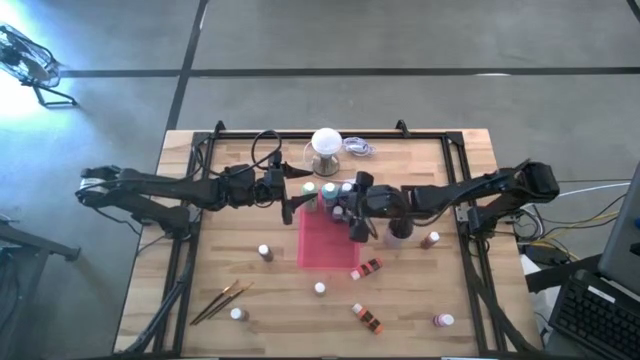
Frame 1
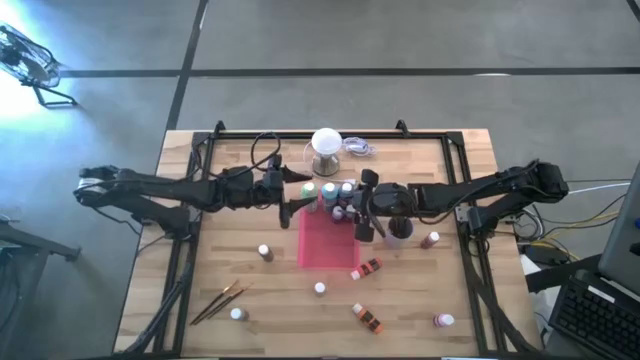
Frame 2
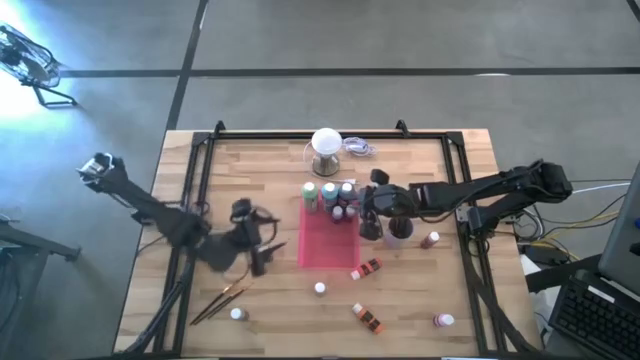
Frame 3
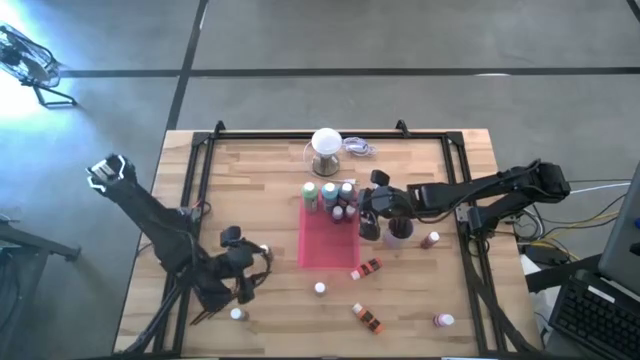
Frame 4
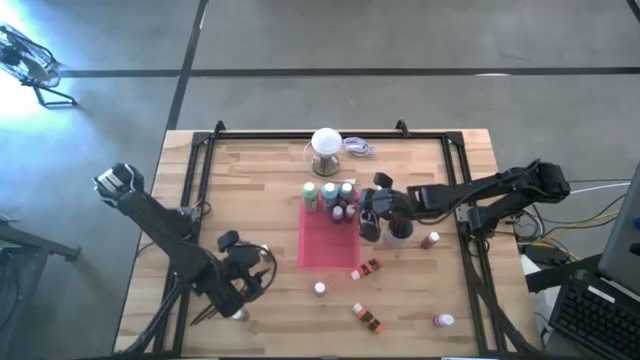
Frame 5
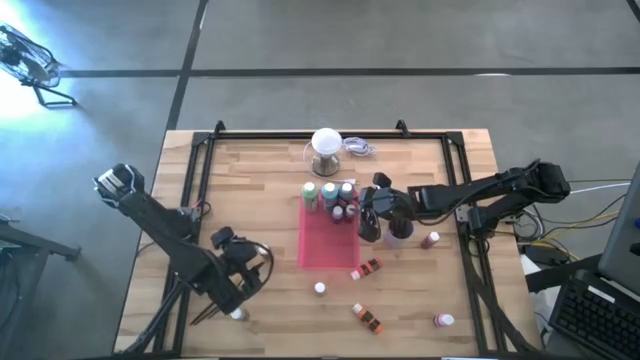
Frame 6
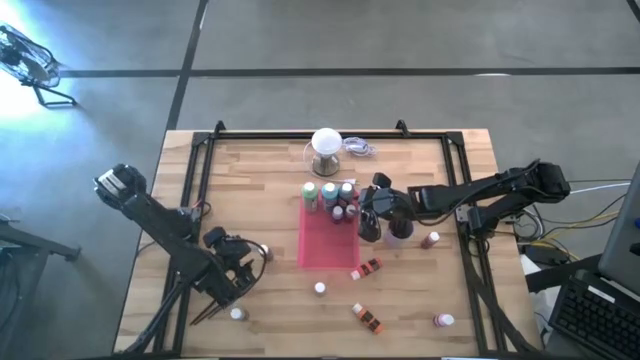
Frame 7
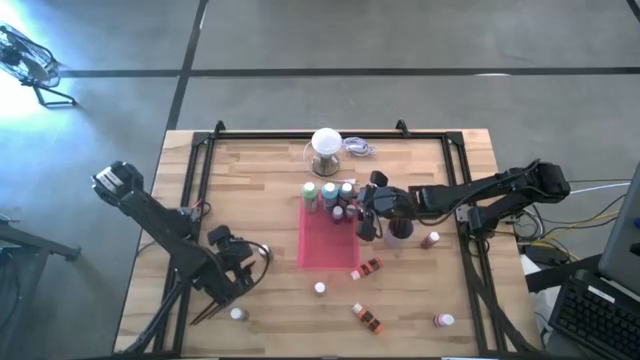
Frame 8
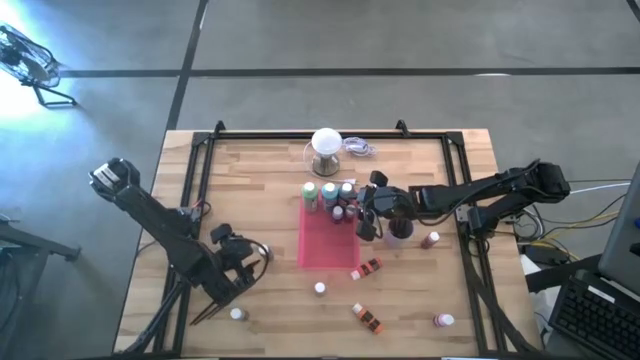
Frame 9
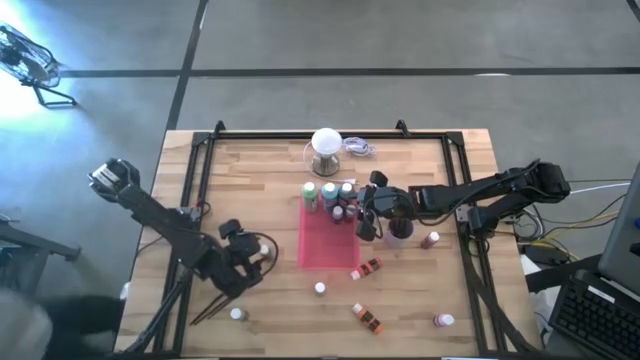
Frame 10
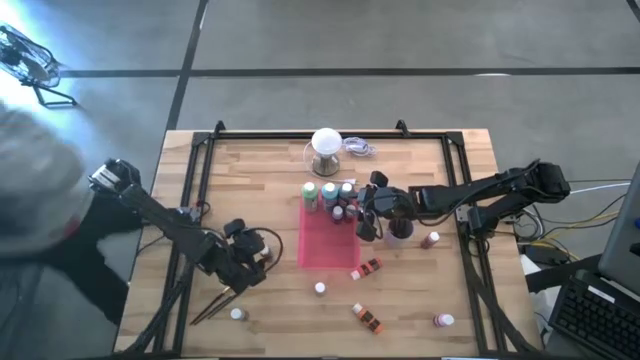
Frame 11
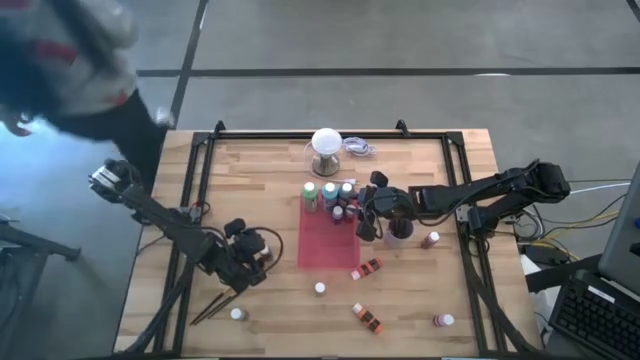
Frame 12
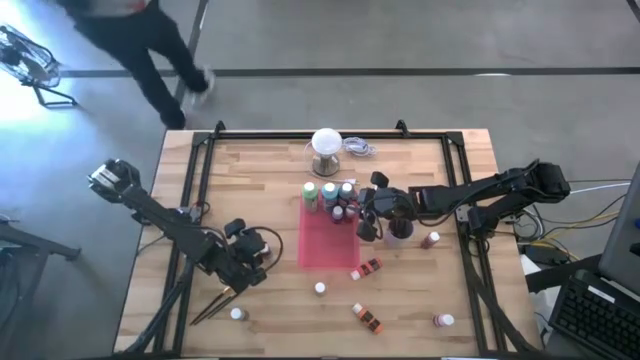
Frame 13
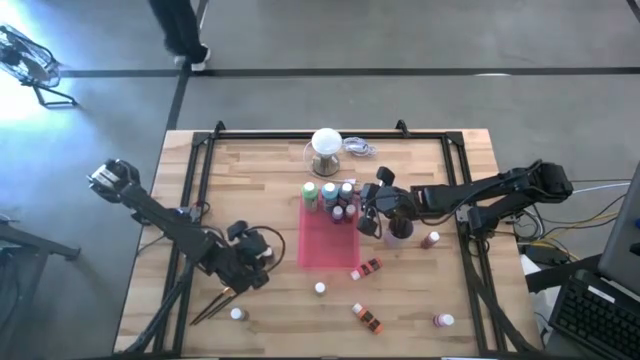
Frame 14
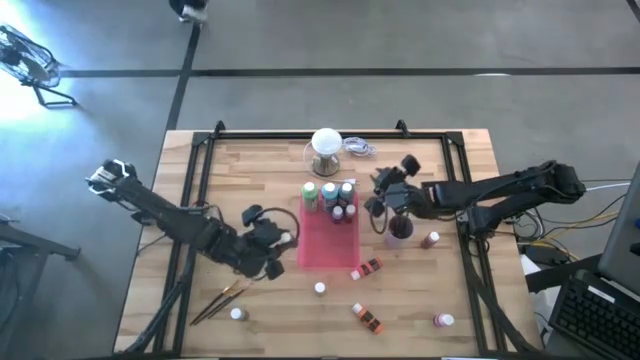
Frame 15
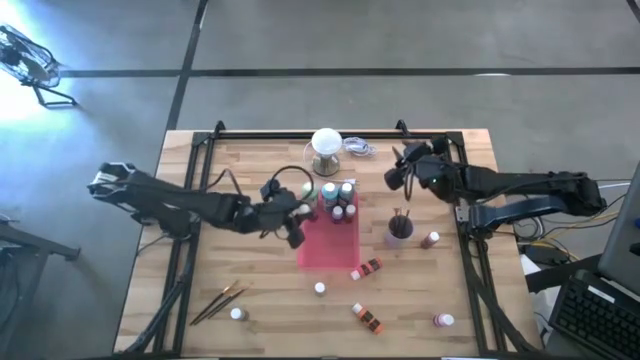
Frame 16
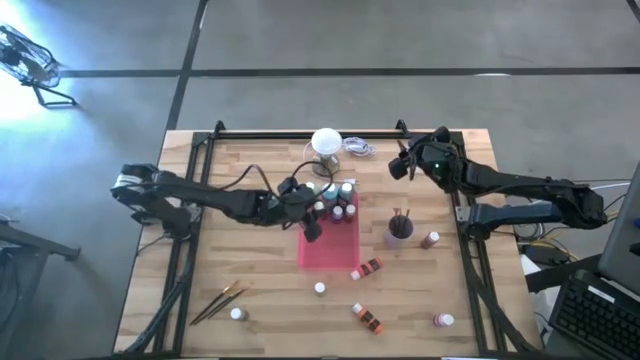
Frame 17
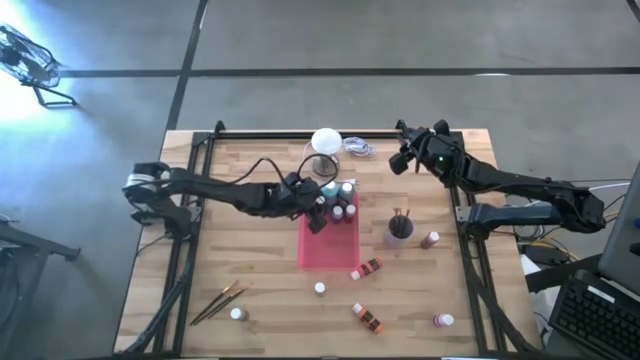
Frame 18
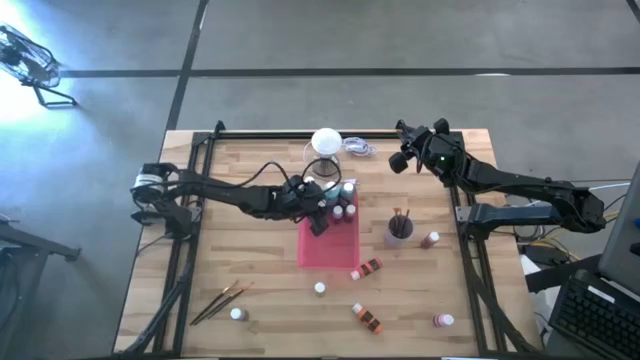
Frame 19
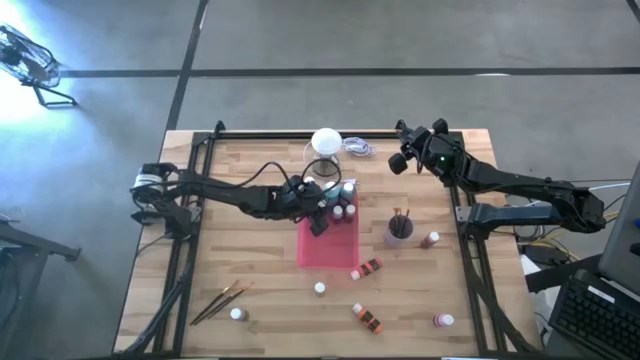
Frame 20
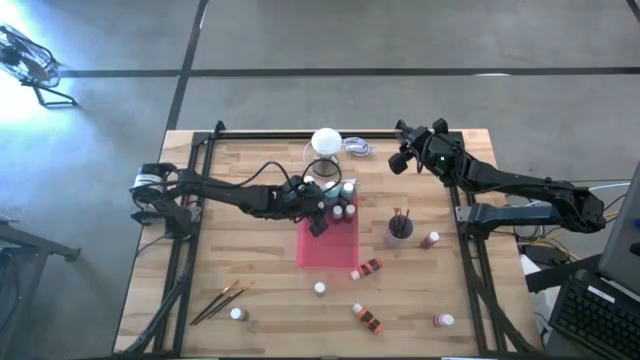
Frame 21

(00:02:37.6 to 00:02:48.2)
Task: Pick & Place Paint Supplies
Put the small black paint bottle into the red bin

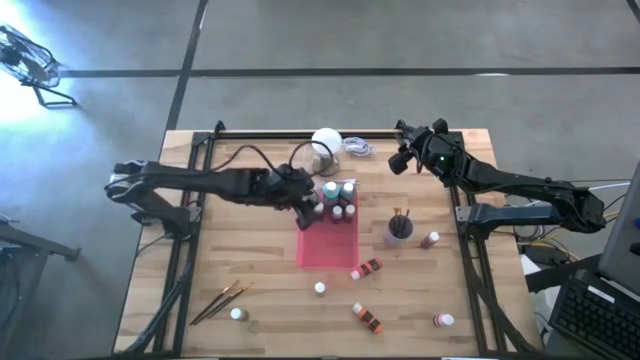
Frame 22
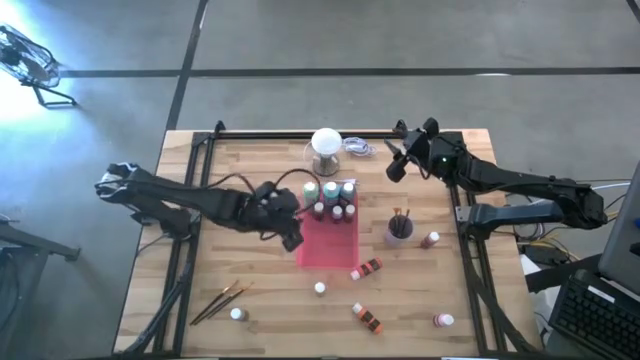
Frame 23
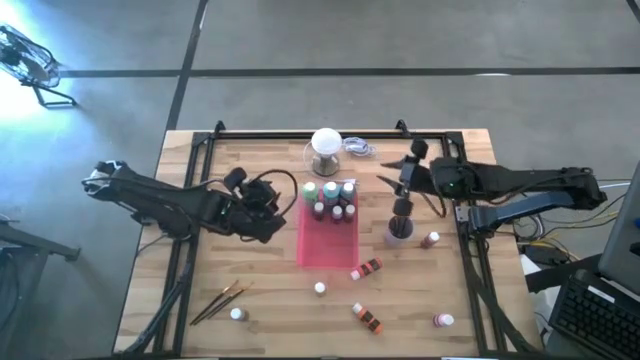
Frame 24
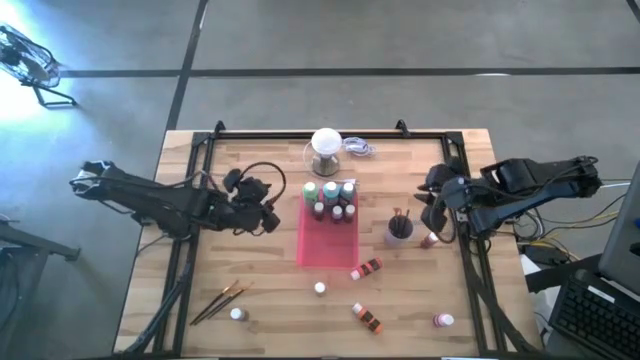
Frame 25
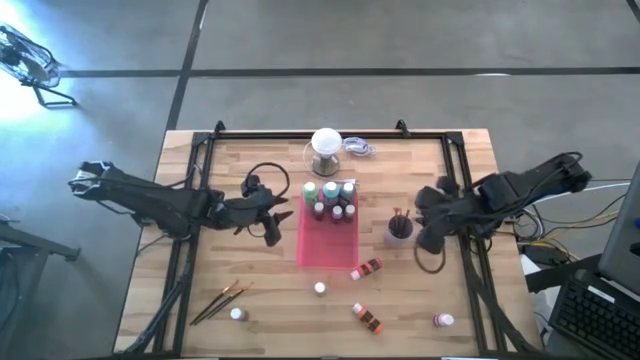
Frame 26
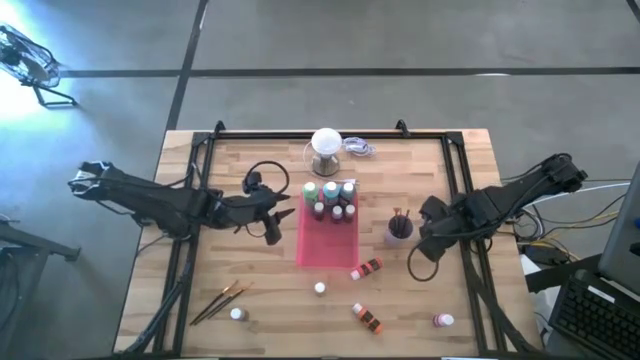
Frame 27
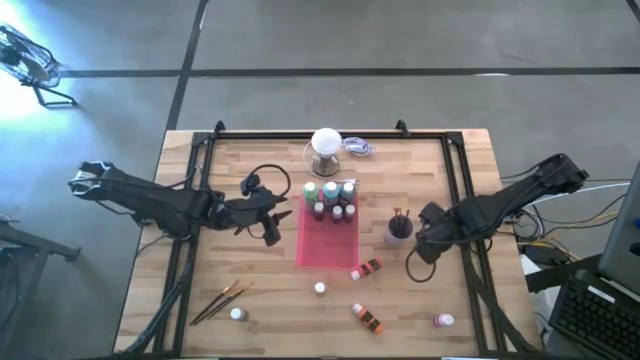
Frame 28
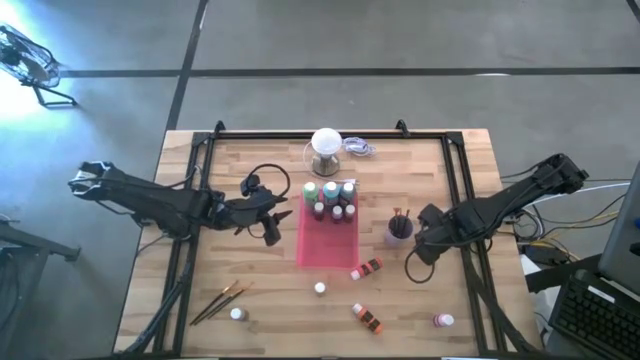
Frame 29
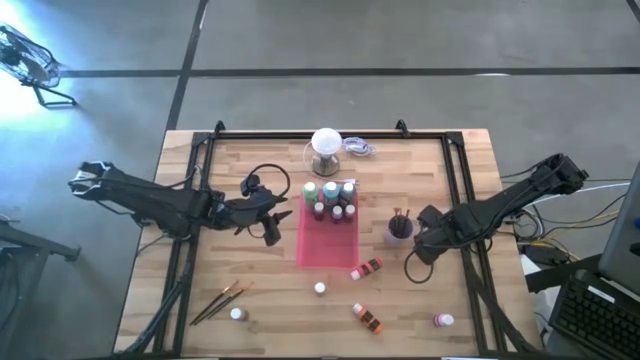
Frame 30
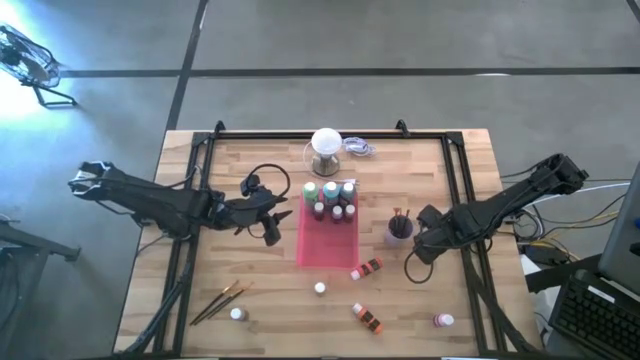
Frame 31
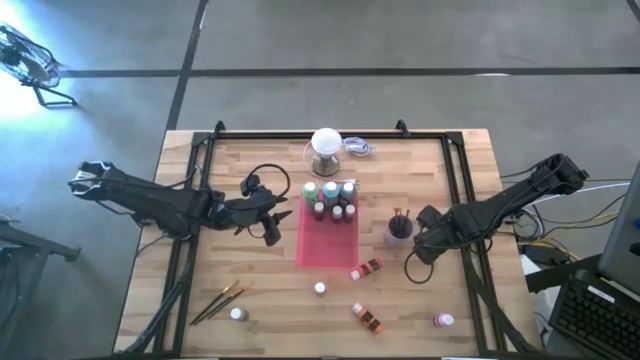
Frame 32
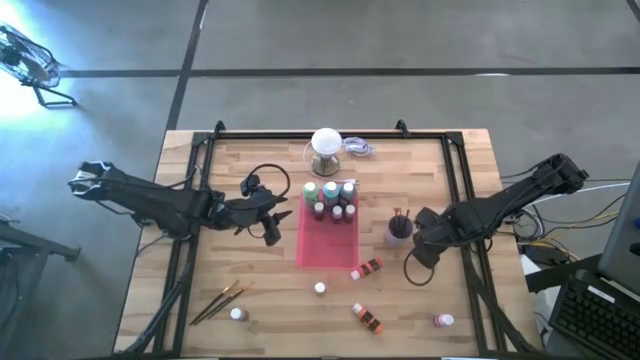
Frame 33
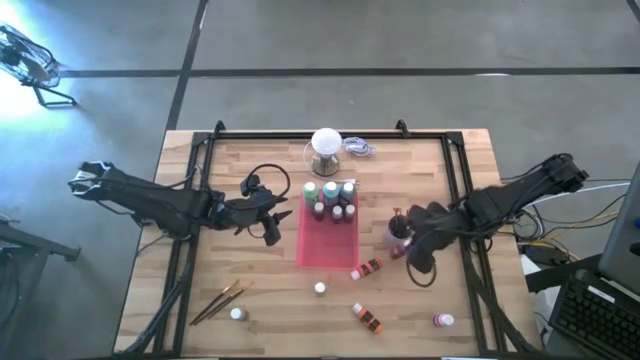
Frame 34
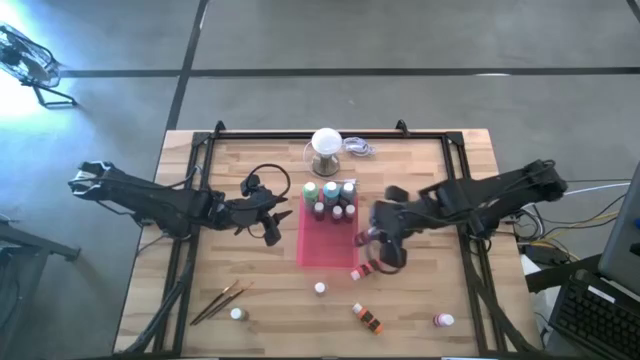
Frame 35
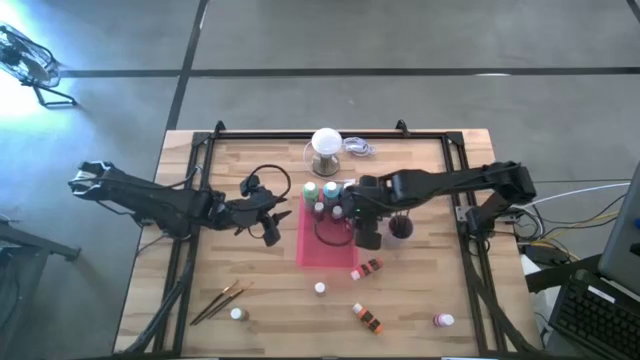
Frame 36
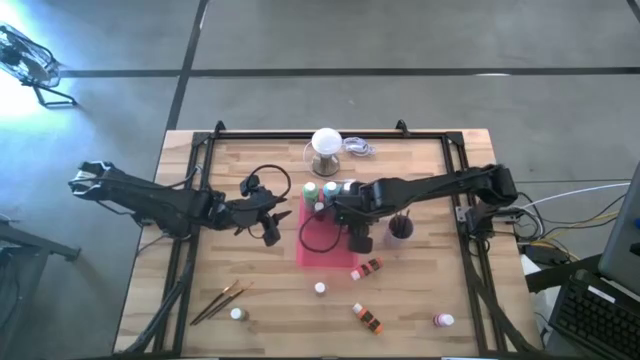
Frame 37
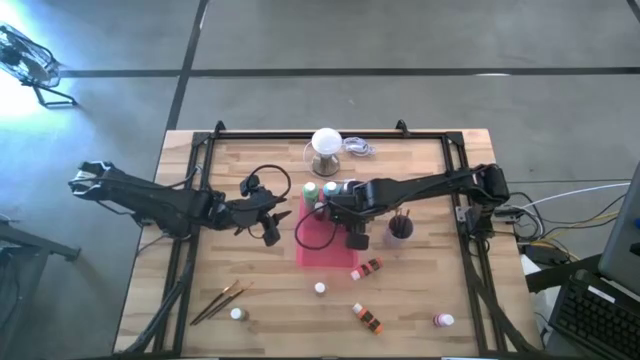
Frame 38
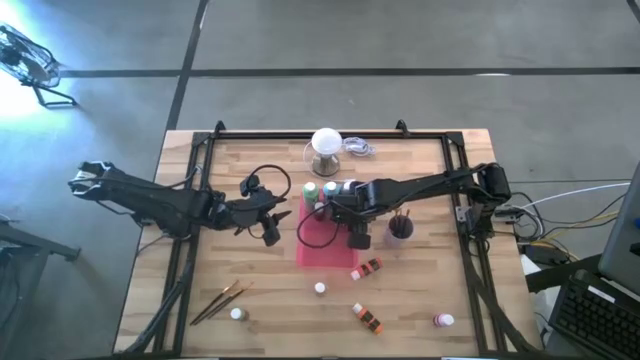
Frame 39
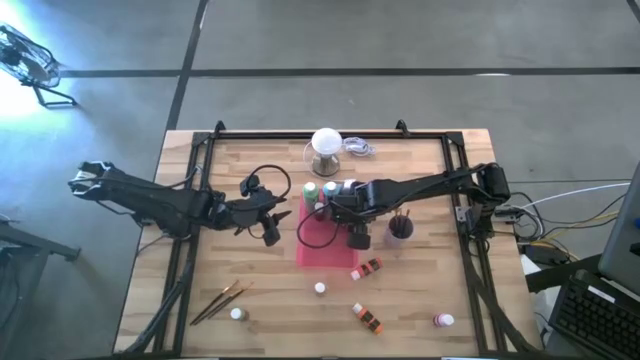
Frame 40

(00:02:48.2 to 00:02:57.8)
Put the small pink paint bottle into the red bin
